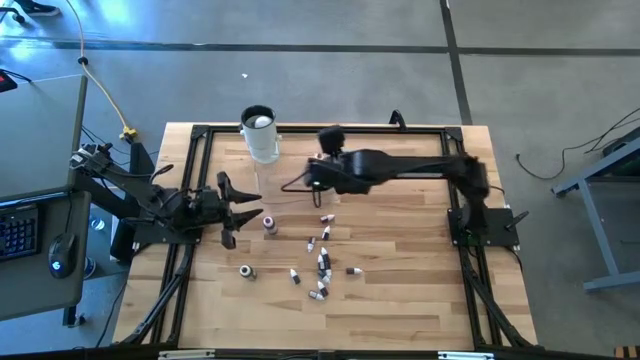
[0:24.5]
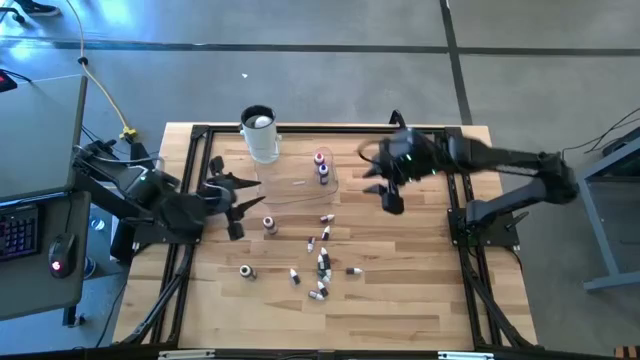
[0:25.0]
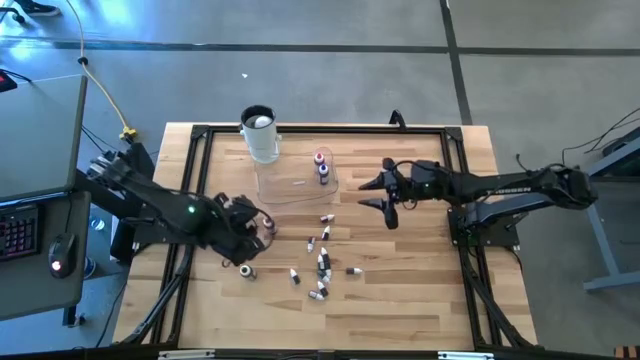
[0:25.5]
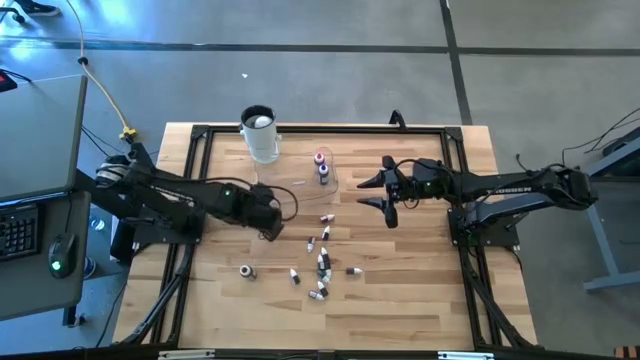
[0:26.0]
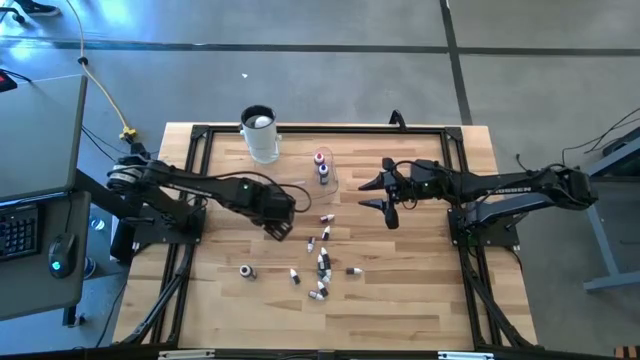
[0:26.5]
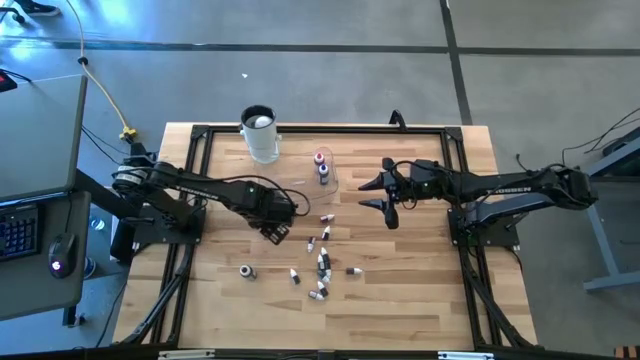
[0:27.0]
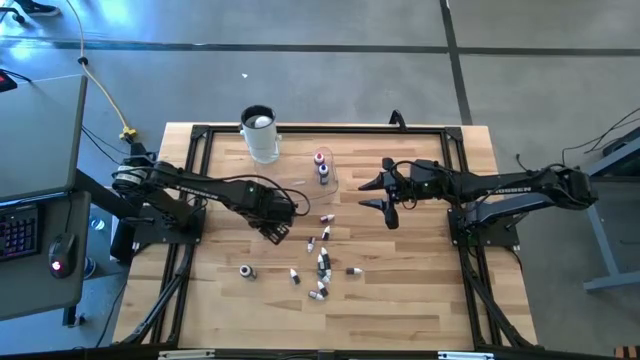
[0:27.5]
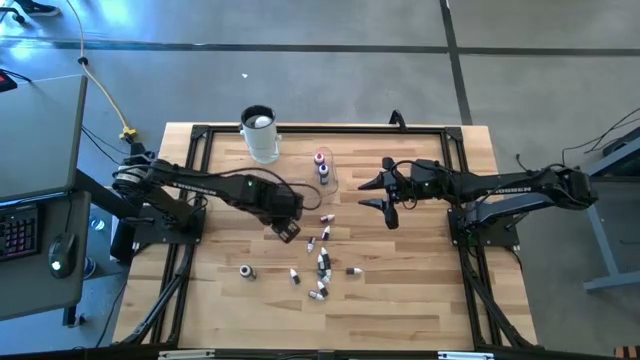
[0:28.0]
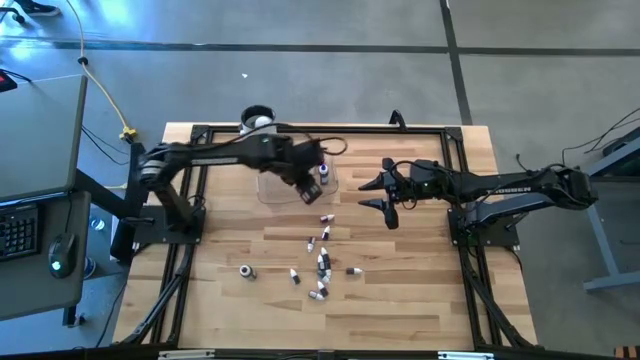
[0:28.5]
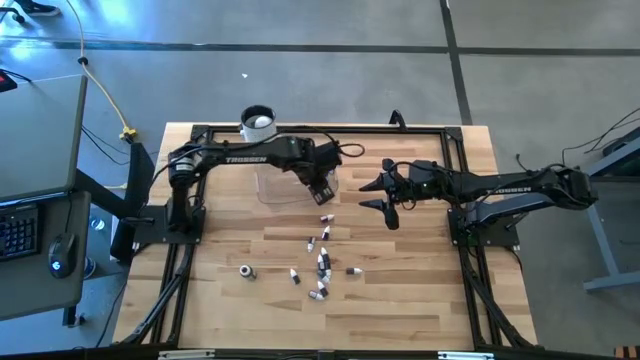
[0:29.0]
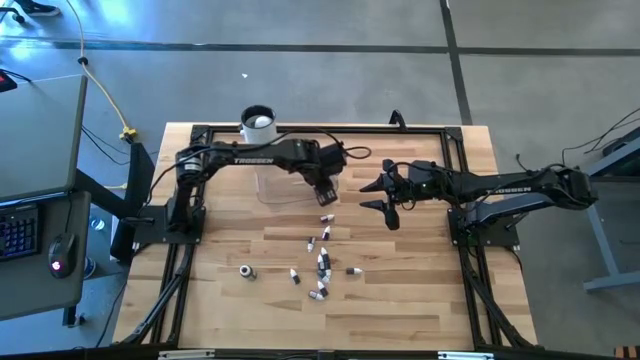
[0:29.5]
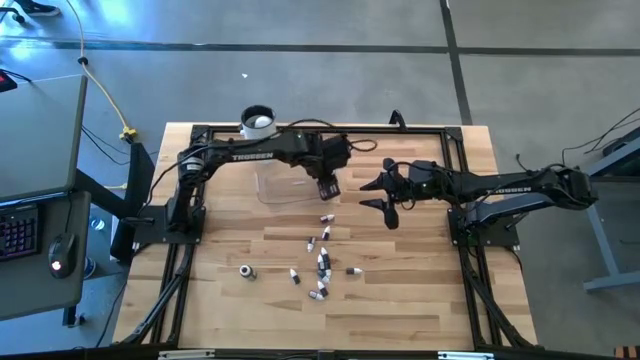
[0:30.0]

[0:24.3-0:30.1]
Task: Pick & Place food coloring
Put the big purple food coloring bottle into the transparent bin

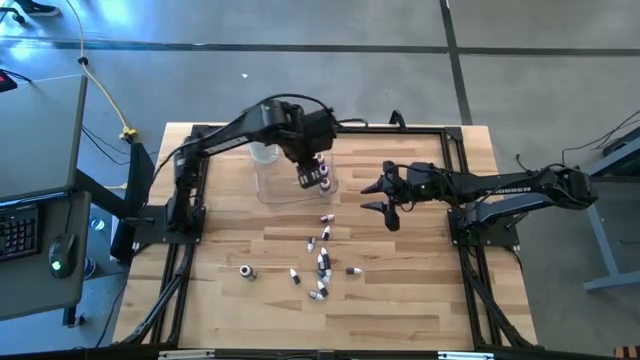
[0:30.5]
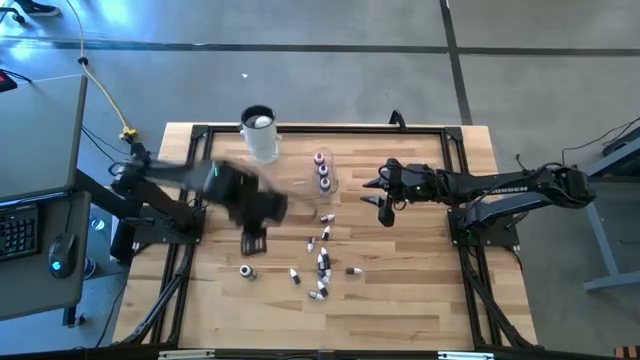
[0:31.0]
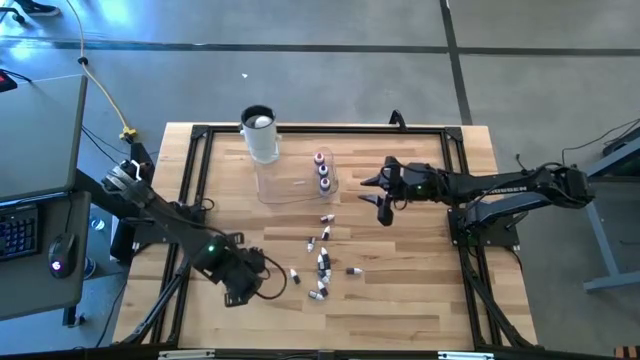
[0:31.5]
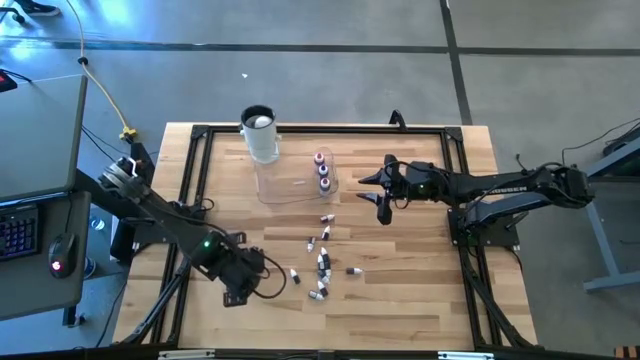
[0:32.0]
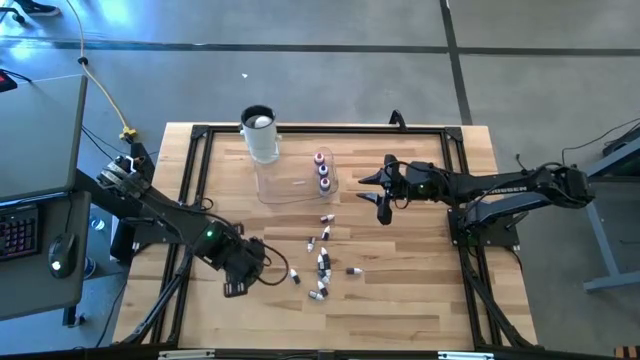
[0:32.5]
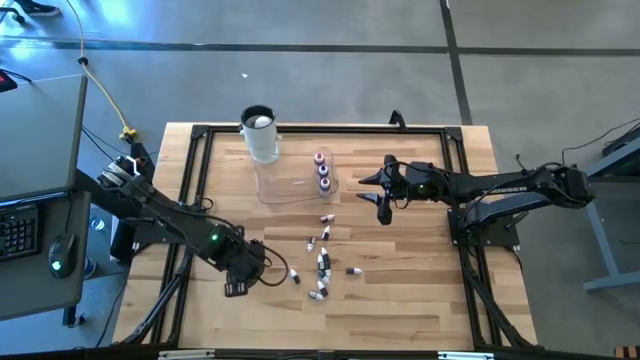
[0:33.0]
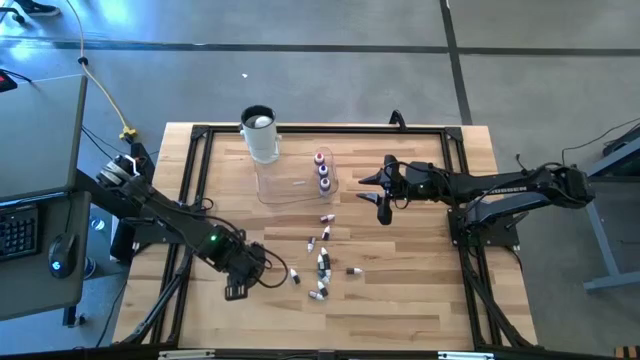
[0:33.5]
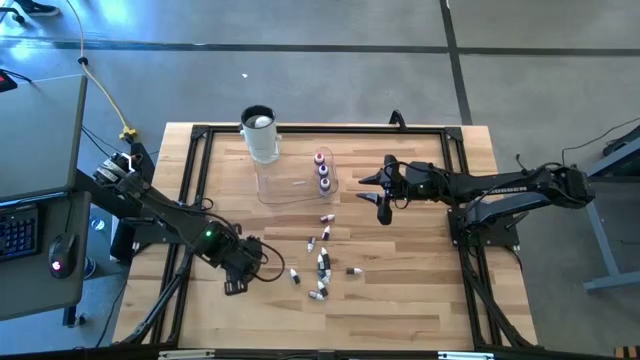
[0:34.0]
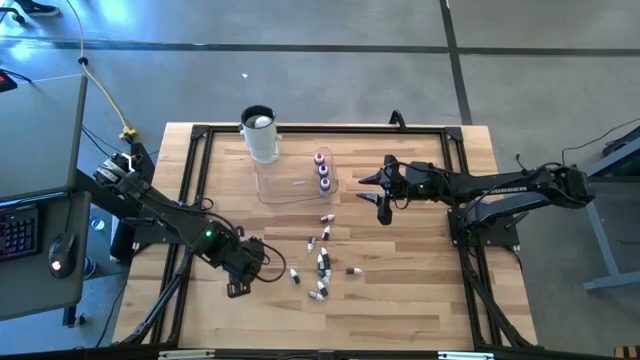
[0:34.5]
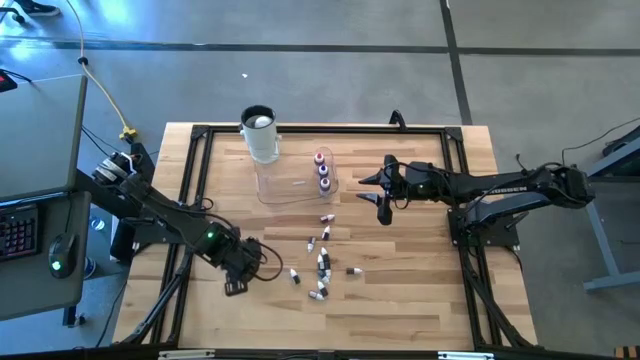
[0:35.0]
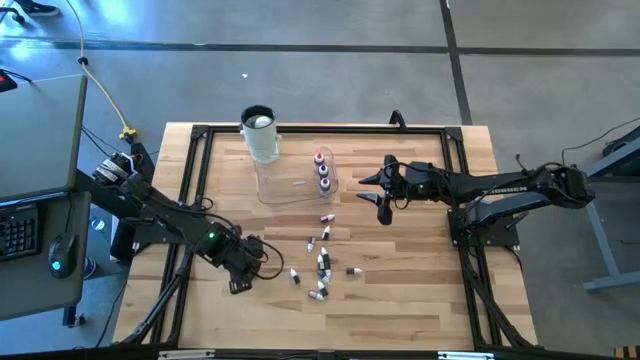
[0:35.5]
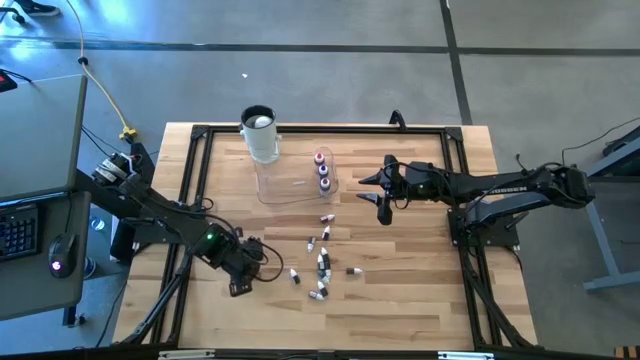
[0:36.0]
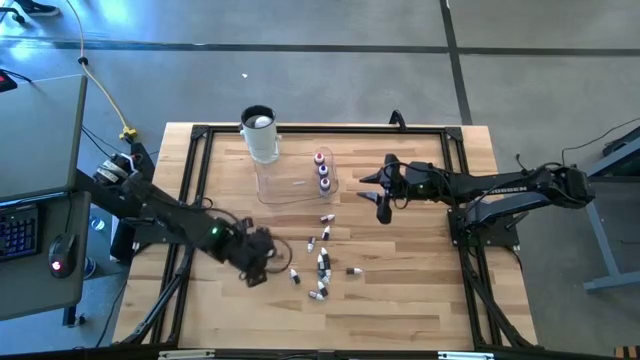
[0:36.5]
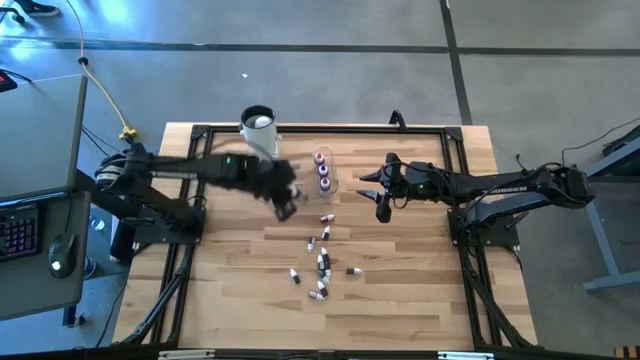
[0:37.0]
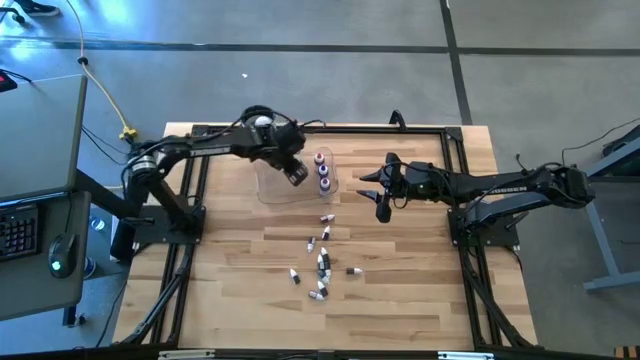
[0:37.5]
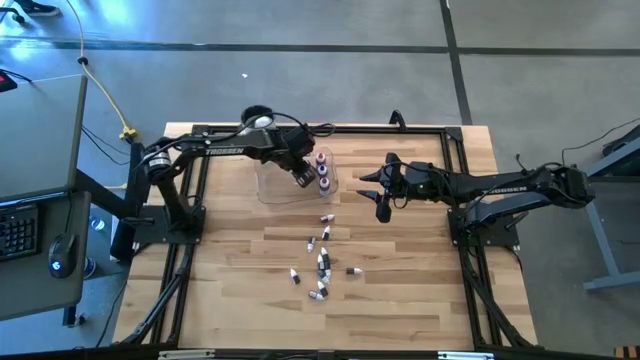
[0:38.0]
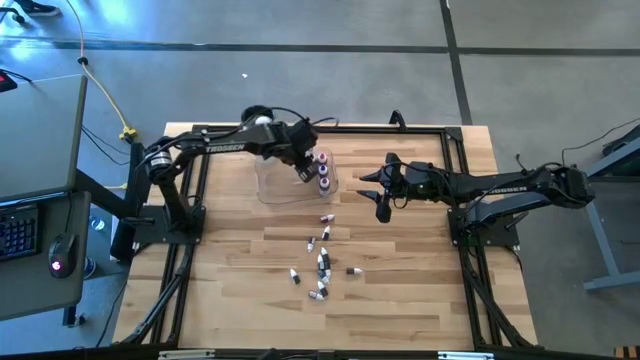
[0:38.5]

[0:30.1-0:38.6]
Put the big black food coloring bottle into the transparent bin

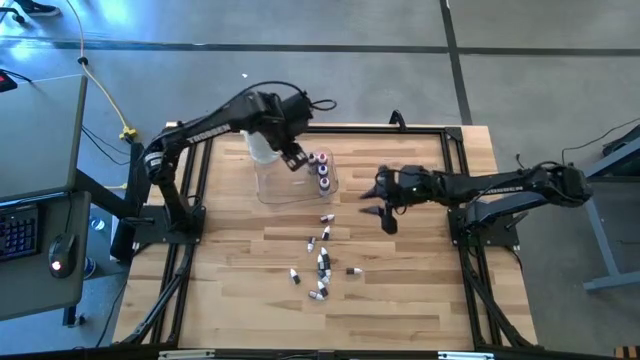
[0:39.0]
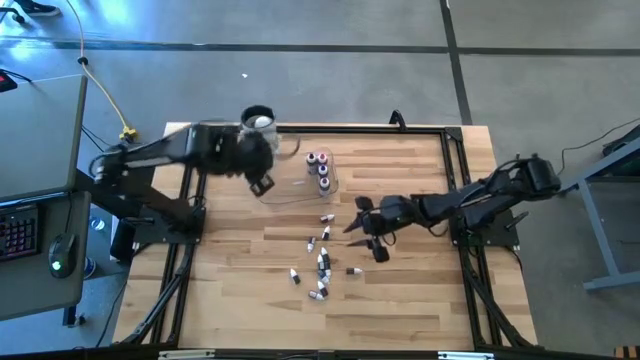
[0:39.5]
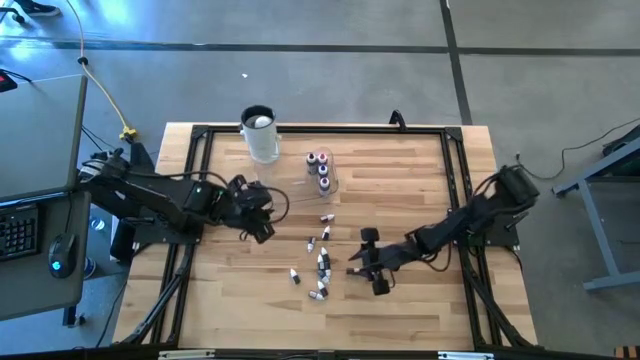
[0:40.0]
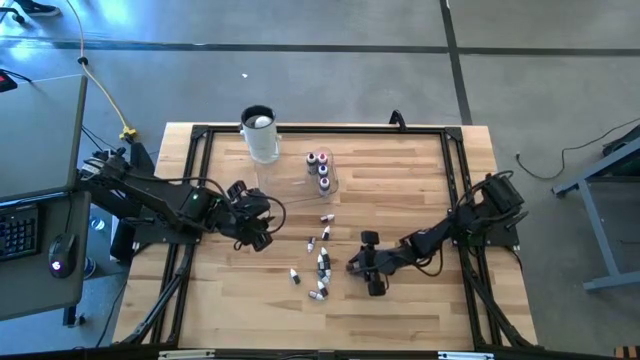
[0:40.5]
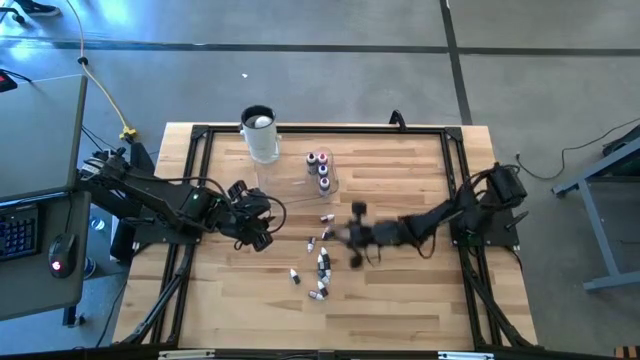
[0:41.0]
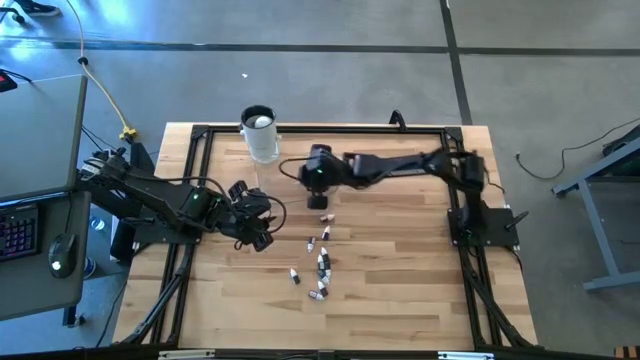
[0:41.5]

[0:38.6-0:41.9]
Put the small brown food coloring bottle into the transparent bin

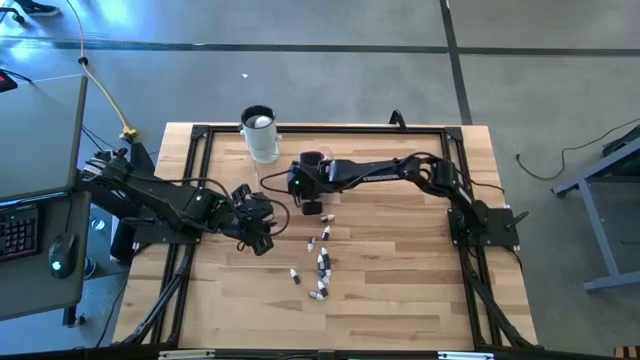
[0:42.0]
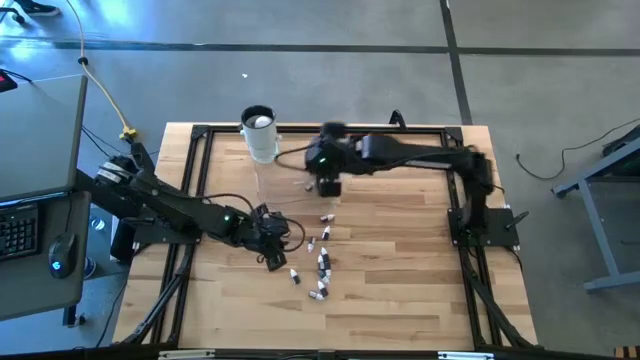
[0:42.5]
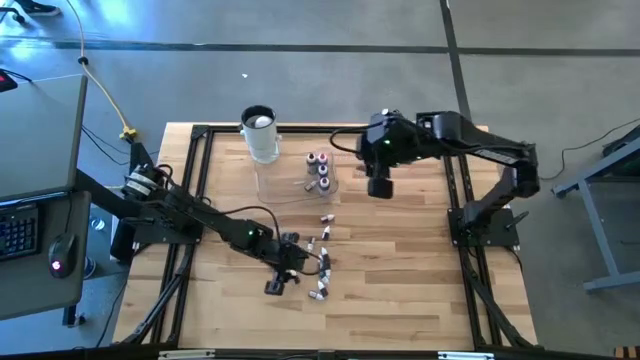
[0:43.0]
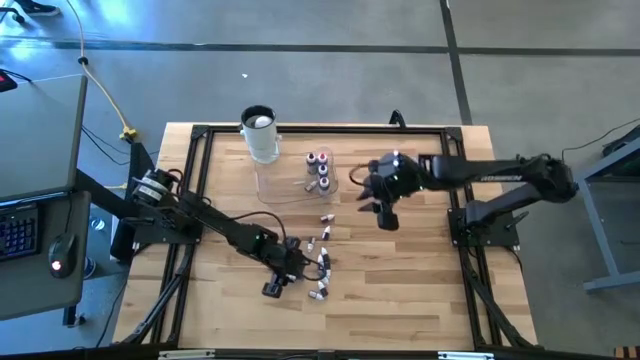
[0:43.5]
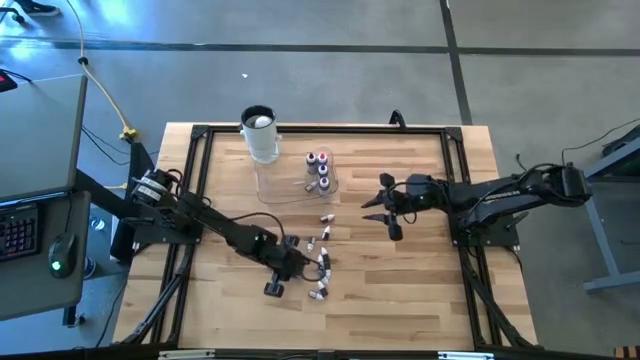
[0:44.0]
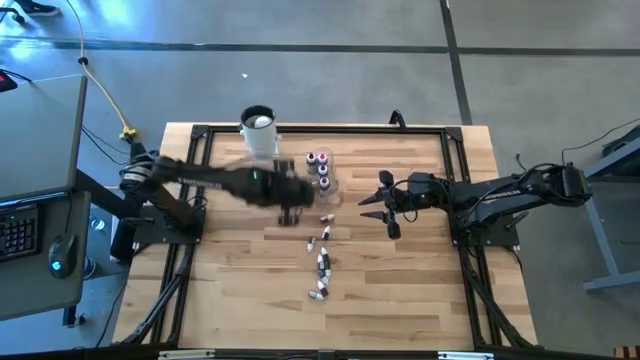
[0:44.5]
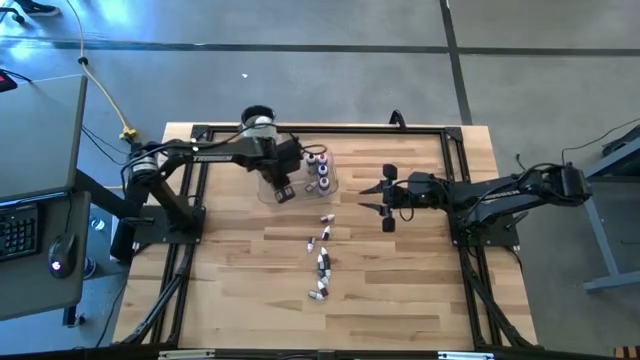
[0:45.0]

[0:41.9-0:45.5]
Put the small black food coloring bottle into the transparent bin

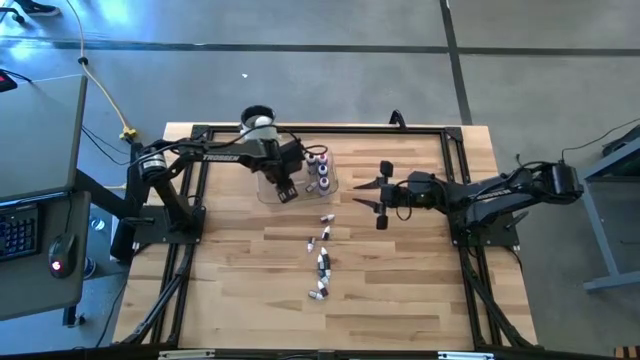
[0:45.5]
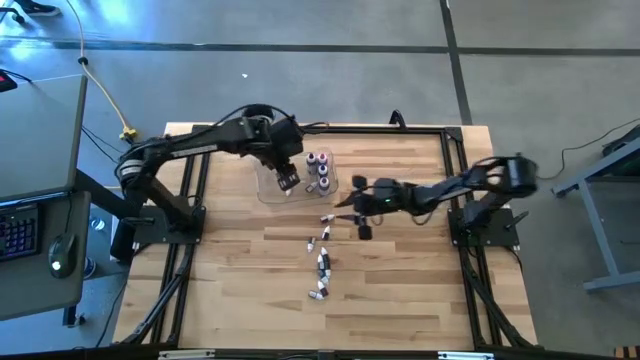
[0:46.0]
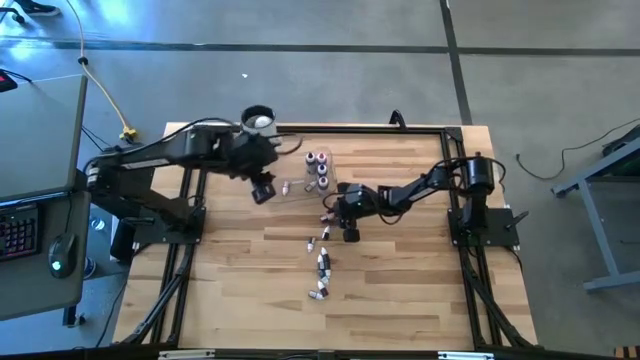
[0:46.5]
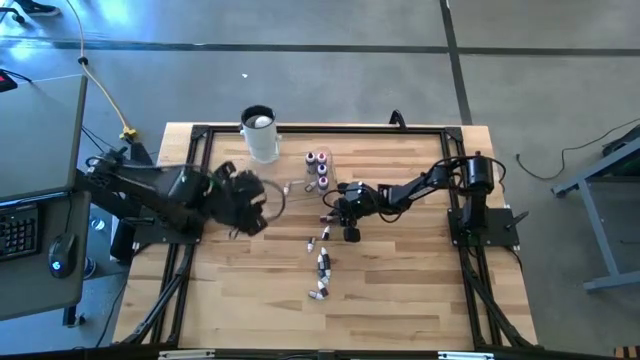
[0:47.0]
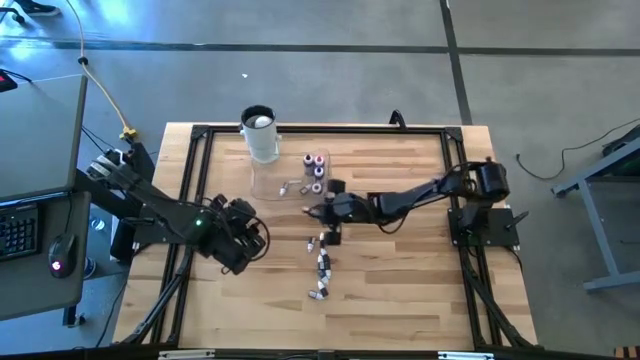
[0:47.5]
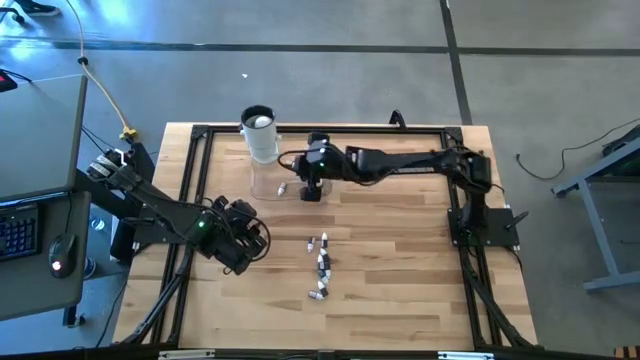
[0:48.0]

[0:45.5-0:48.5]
Put the small red food coloring bottle into the transparent bin
